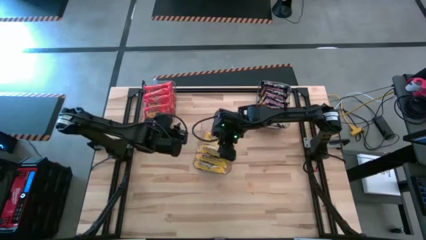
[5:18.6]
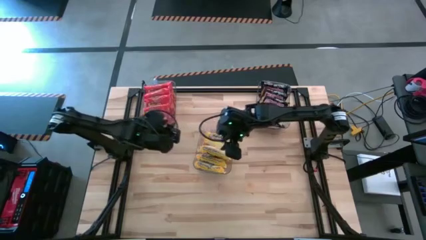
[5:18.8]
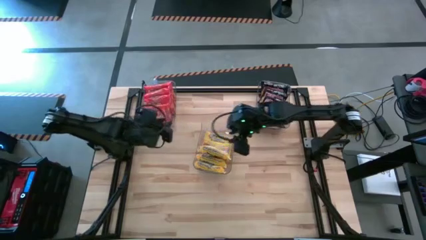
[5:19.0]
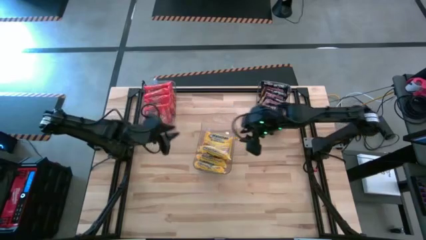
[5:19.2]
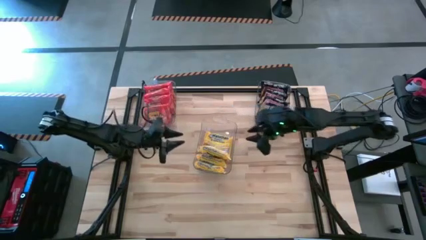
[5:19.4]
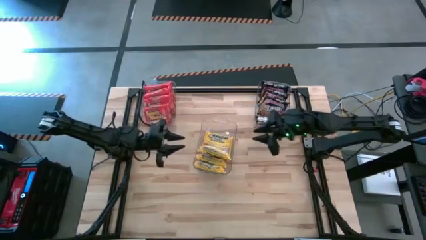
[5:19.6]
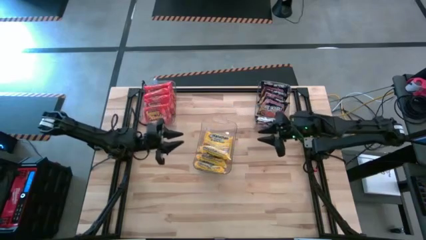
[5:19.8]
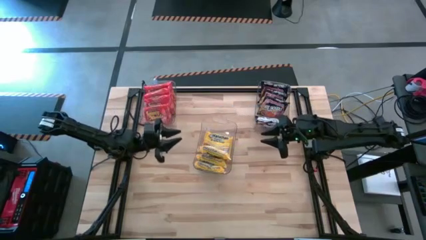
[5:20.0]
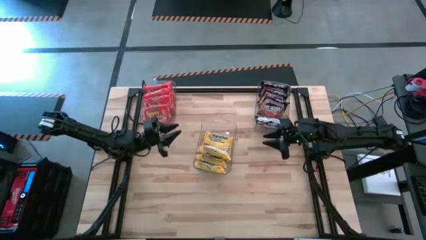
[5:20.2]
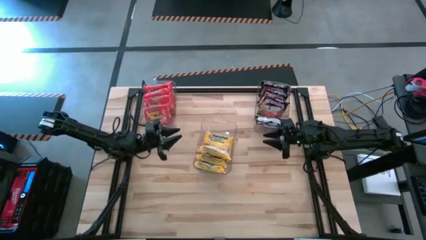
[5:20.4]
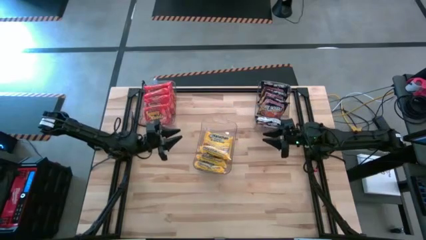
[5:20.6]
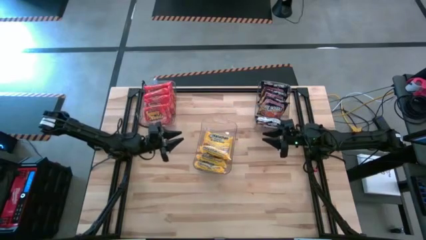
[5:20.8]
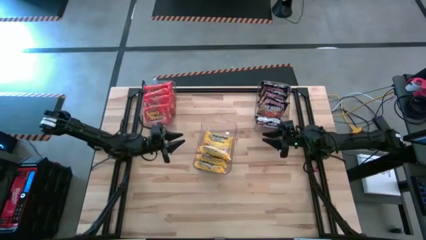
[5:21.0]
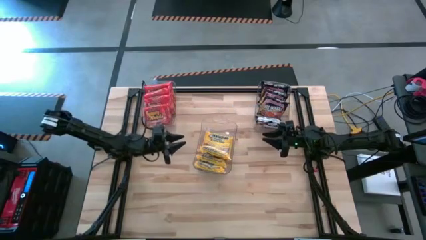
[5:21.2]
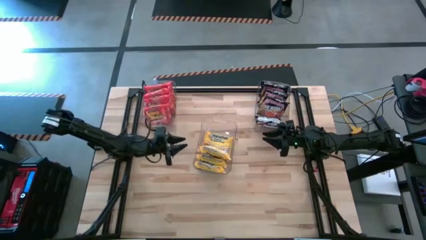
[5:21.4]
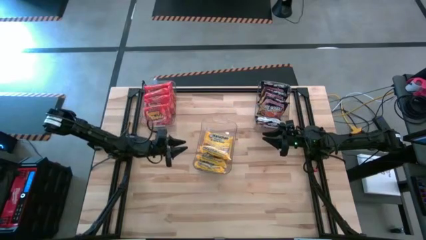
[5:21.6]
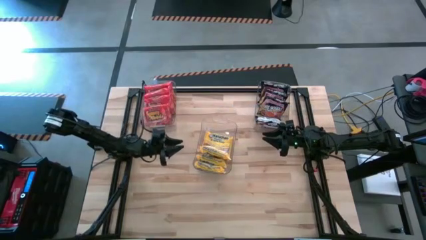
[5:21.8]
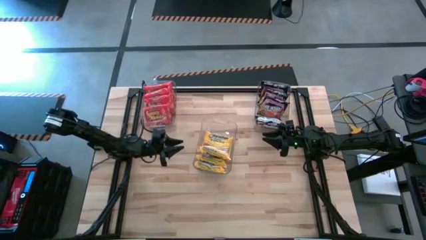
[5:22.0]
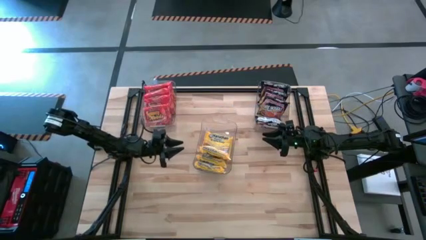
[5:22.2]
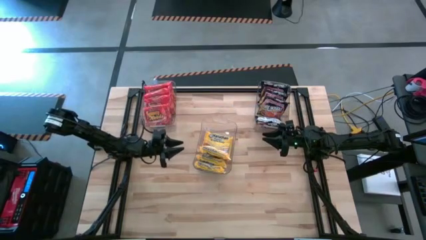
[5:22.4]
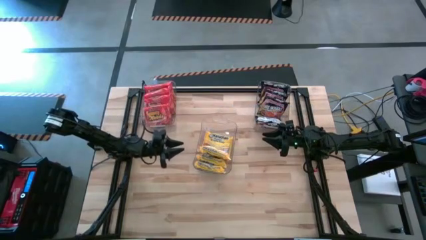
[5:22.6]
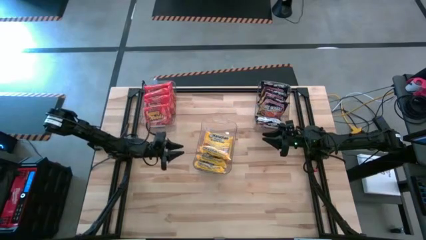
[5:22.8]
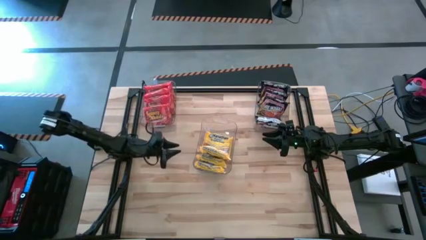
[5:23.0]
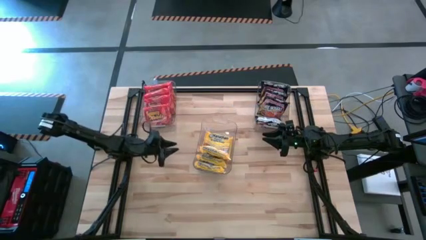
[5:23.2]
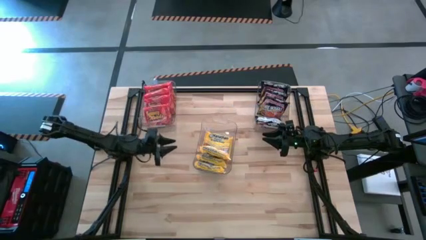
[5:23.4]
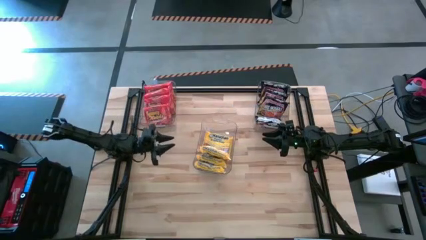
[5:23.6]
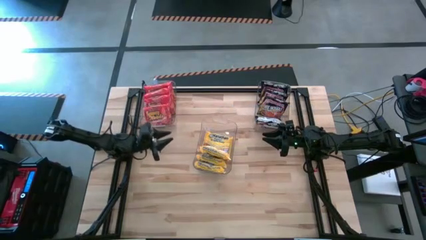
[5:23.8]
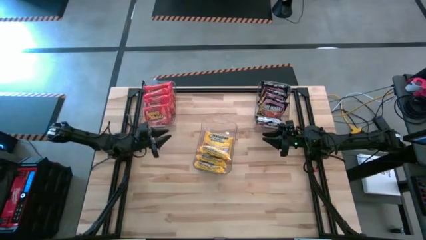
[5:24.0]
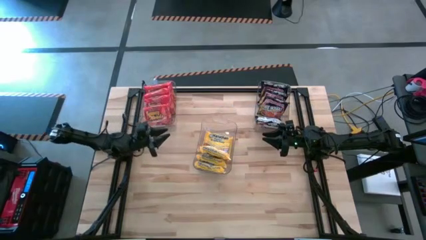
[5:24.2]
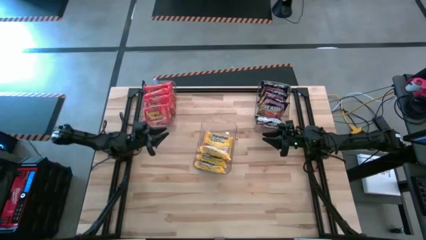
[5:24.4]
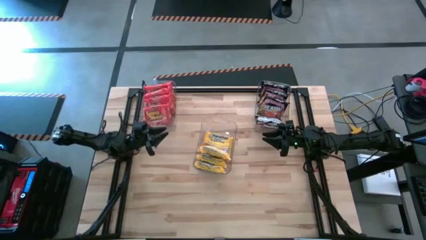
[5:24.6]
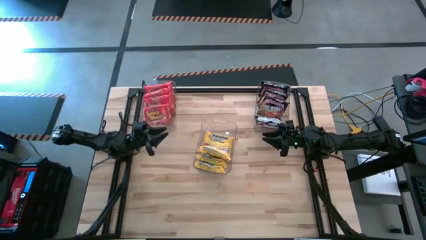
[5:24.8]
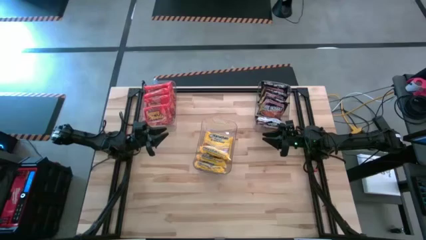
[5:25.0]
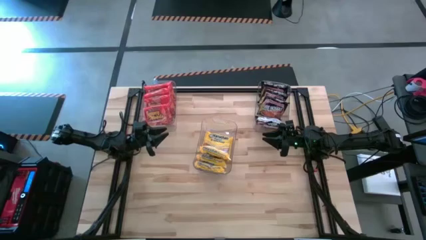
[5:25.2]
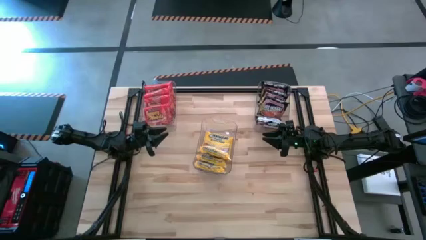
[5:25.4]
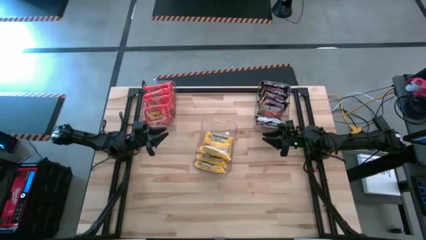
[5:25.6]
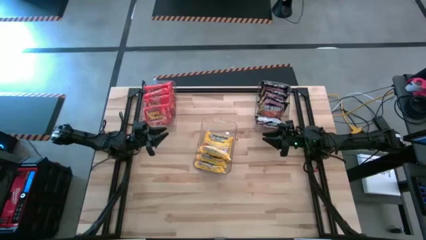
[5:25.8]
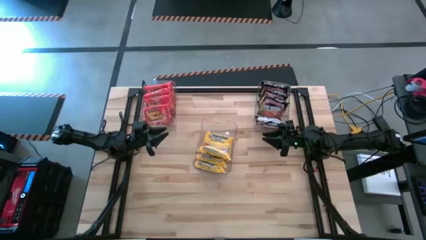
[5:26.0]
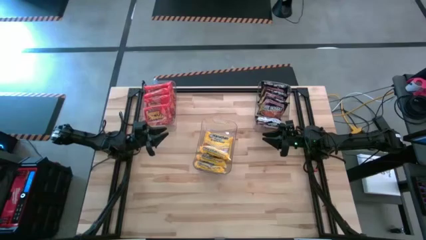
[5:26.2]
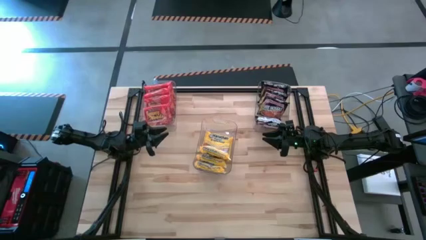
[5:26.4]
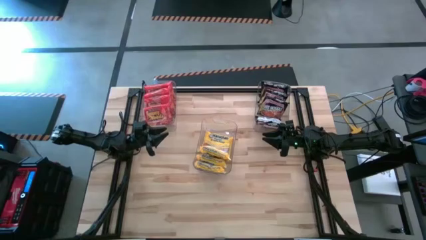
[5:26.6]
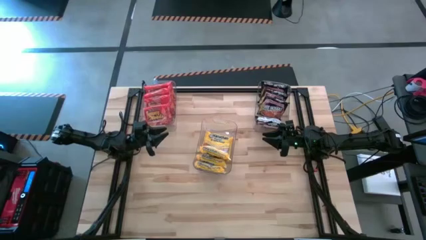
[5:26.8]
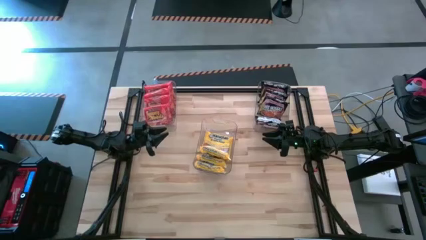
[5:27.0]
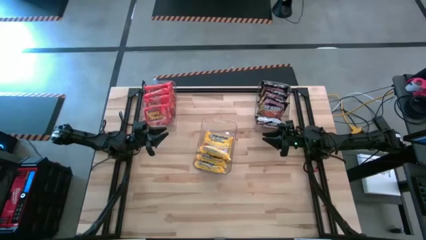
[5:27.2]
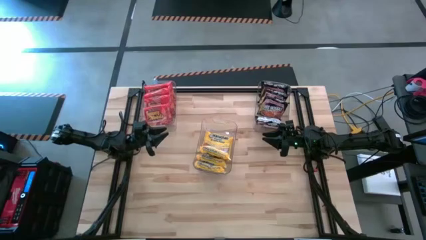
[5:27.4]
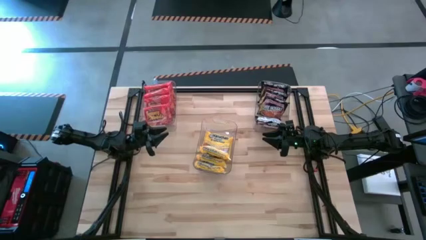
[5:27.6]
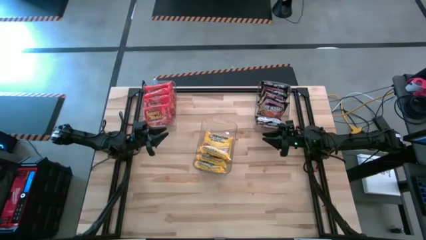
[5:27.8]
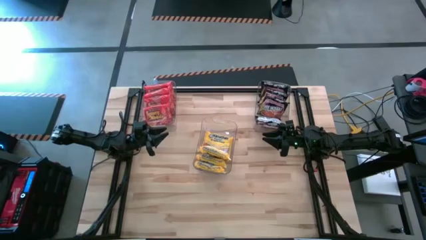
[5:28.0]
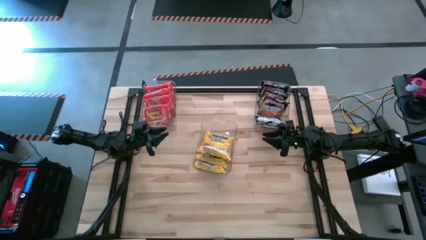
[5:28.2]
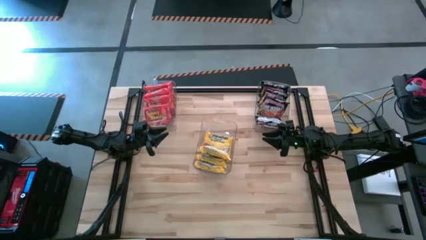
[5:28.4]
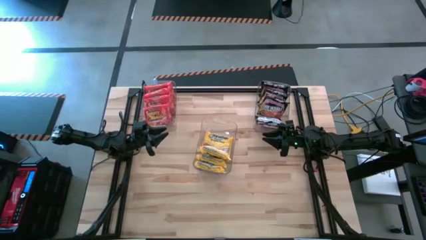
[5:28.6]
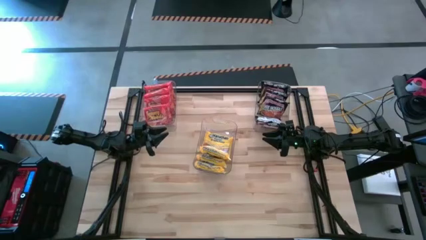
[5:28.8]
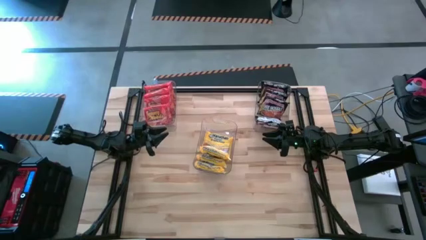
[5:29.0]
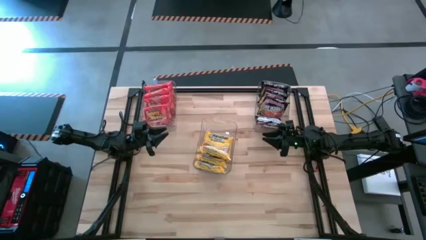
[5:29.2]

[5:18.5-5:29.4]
Task: Sort Maruchan noodles
Return to Home Position

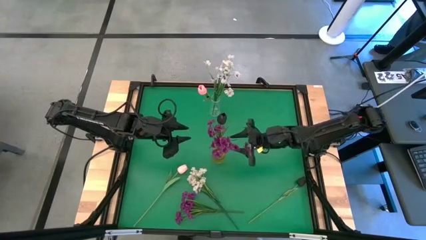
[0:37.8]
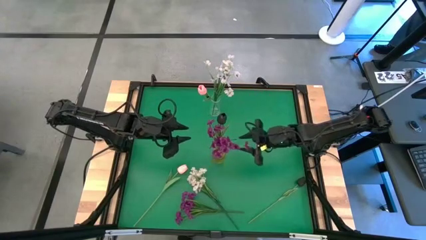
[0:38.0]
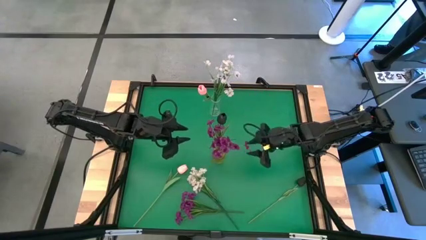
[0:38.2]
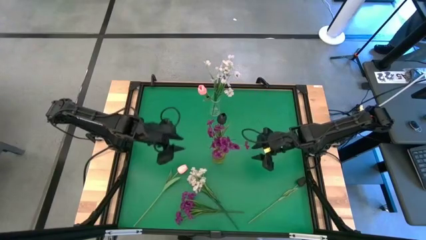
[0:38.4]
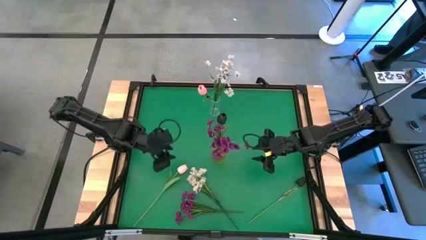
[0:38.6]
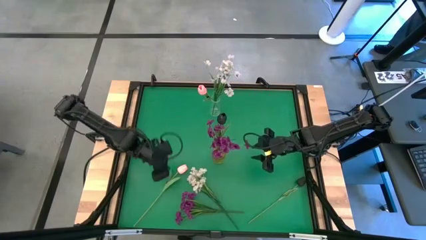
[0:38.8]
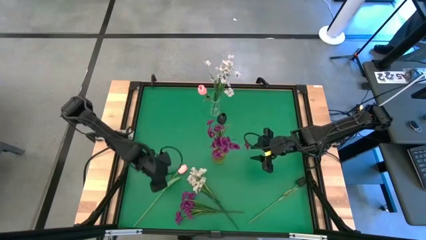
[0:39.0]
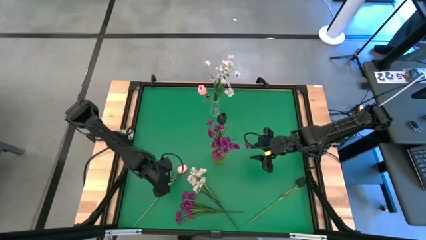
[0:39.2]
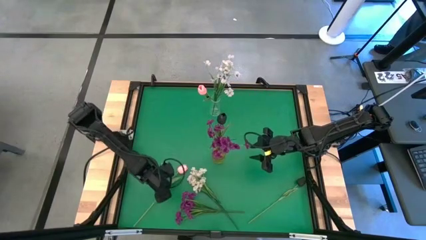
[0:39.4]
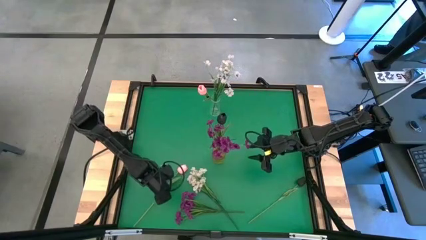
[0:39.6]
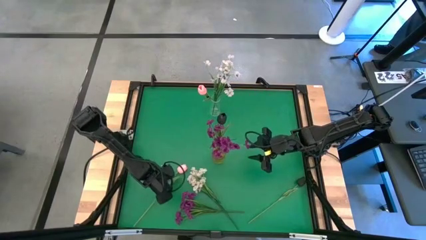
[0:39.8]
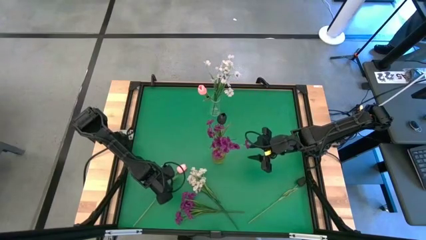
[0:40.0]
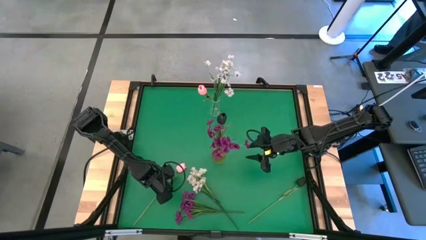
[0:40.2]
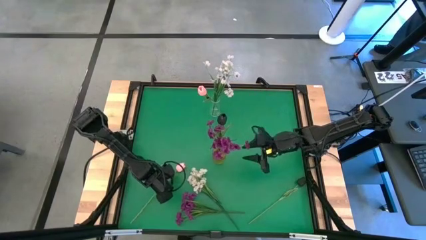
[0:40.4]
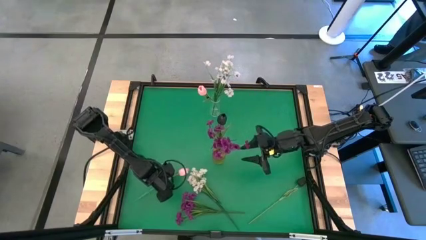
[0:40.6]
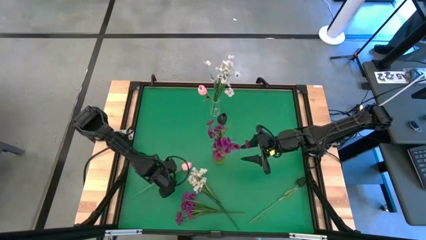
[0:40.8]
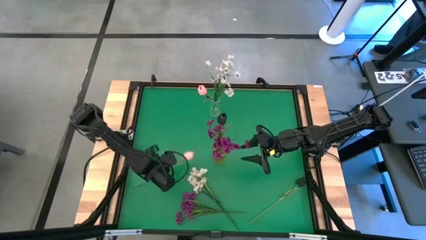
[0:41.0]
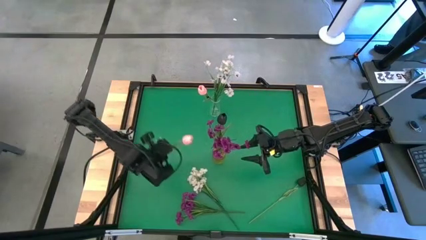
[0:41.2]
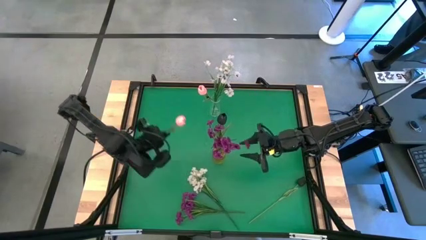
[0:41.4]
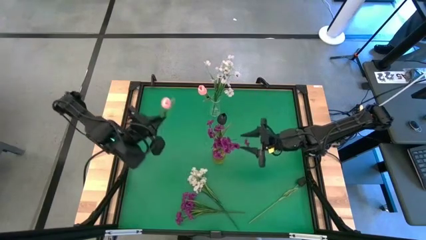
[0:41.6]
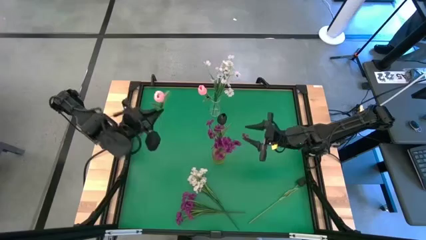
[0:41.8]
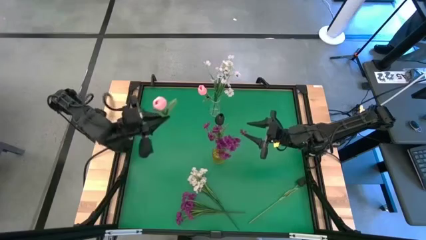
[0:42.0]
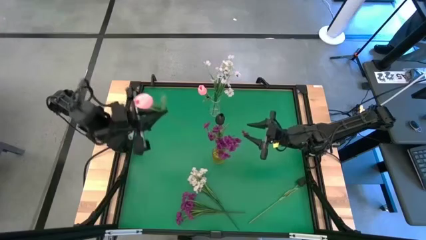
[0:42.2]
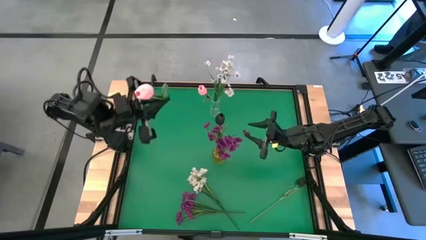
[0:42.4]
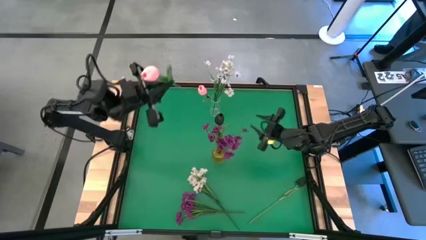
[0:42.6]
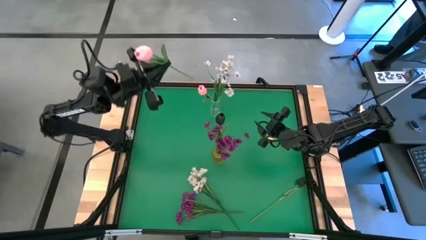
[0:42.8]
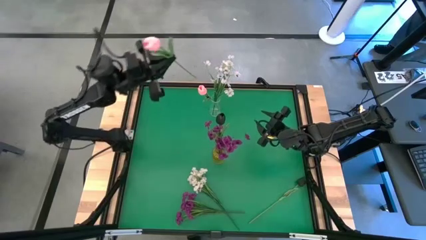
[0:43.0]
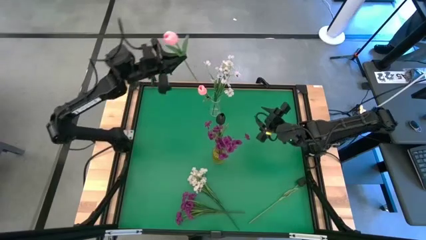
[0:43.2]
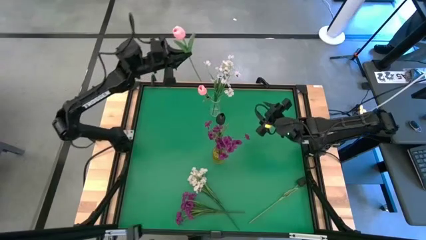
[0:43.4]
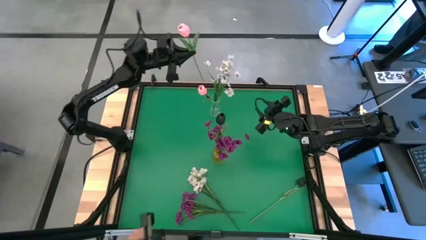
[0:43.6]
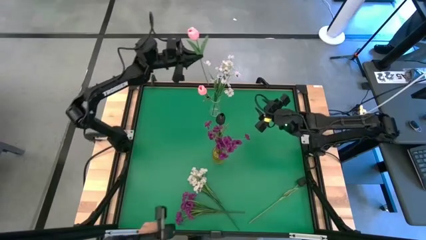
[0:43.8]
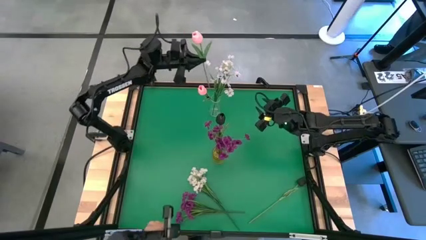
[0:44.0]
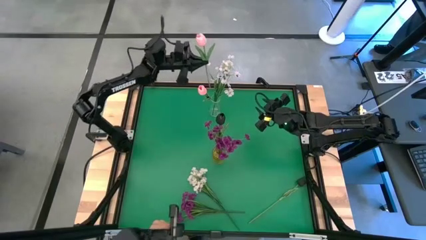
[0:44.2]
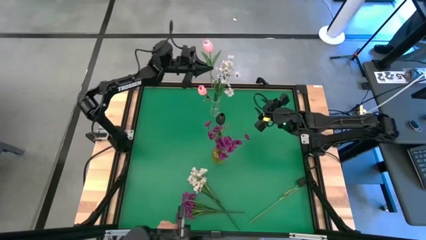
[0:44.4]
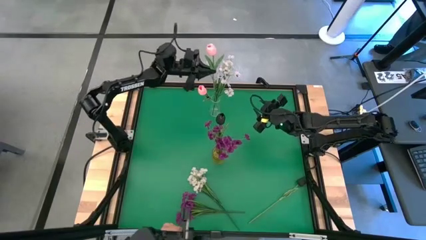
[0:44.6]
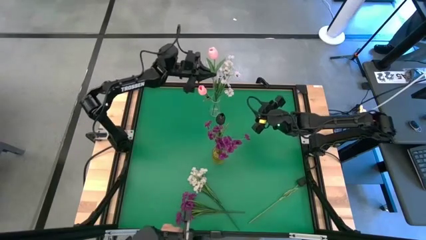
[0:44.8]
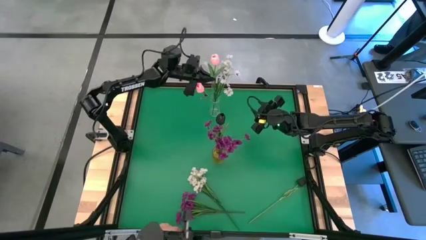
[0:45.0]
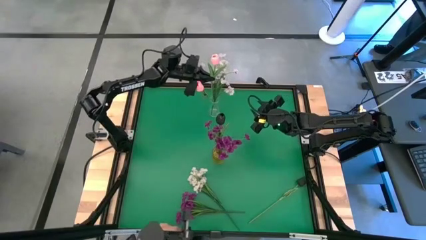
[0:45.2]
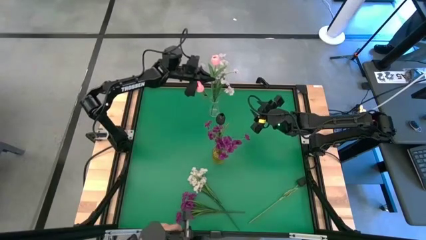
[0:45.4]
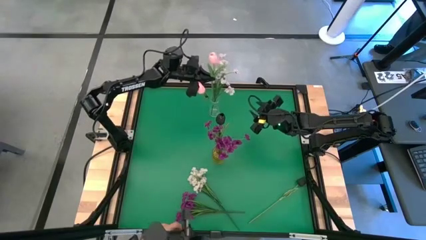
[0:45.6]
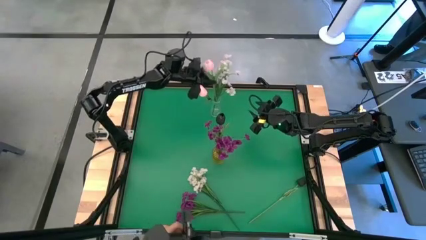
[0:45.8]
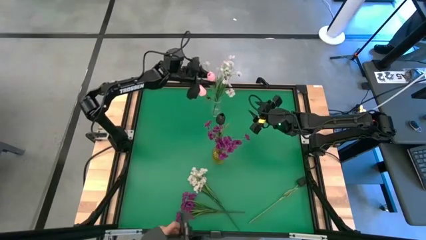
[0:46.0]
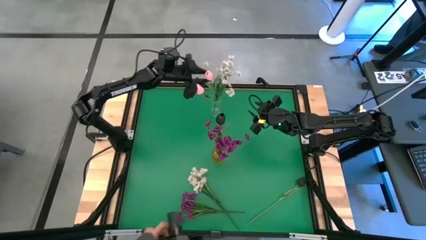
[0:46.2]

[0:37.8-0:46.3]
Task: Sort flowers into vase by color
Put the pink flower into the transparent vase
